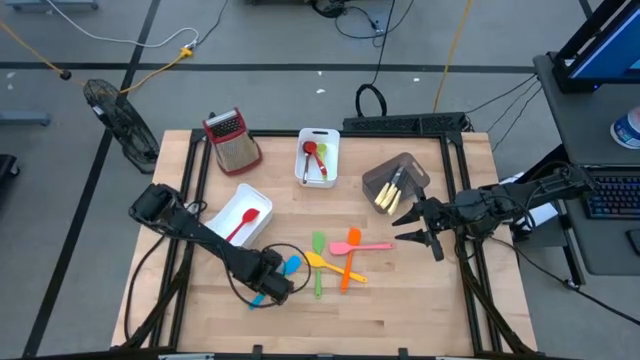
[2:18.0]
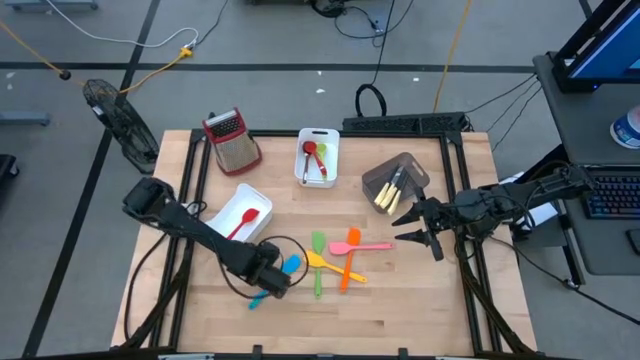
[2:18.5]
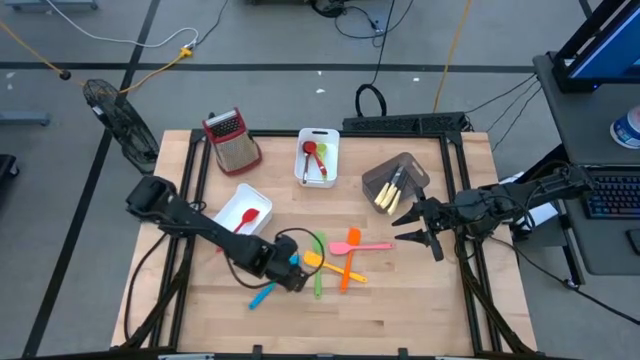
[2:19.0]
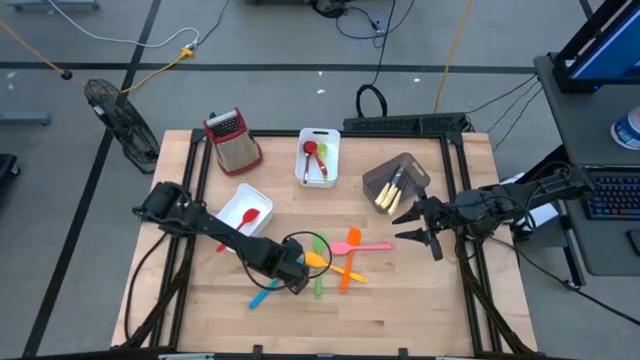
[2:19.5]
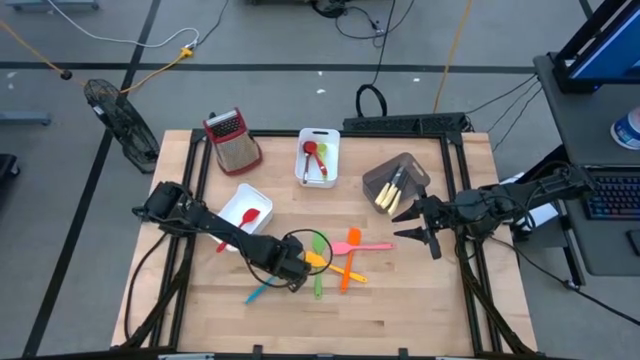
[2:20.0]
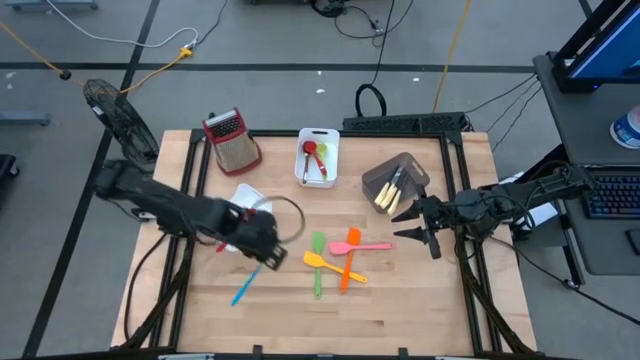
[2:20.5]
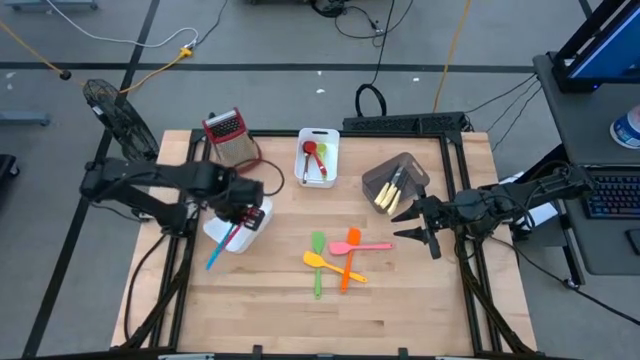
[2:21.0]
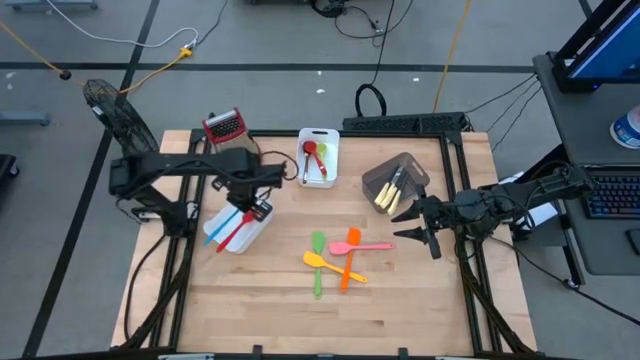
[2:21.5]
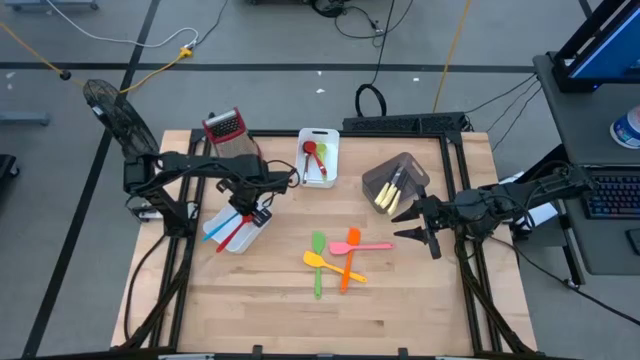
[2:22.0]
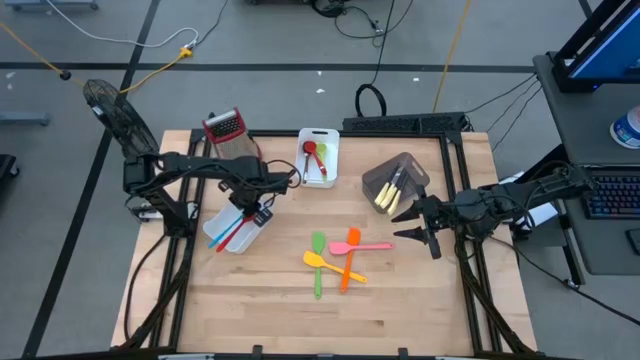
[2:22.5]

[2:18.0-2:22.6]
Task: Pick & Place Kitchen Items
Put the blue spatula into the bottom white bin

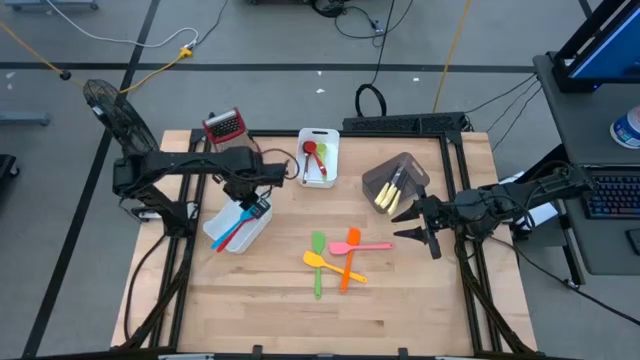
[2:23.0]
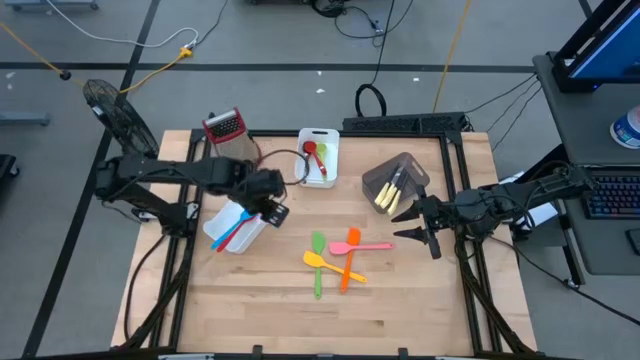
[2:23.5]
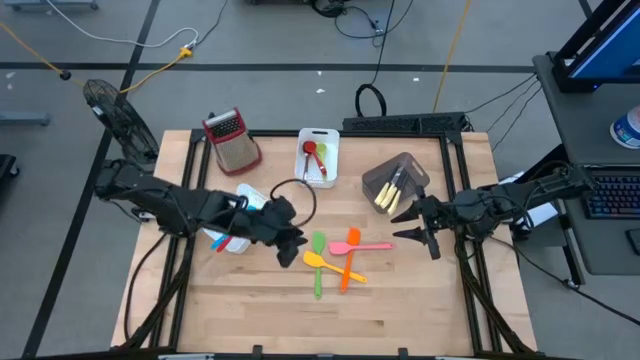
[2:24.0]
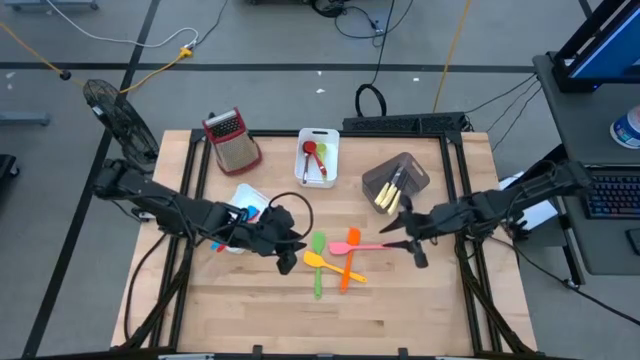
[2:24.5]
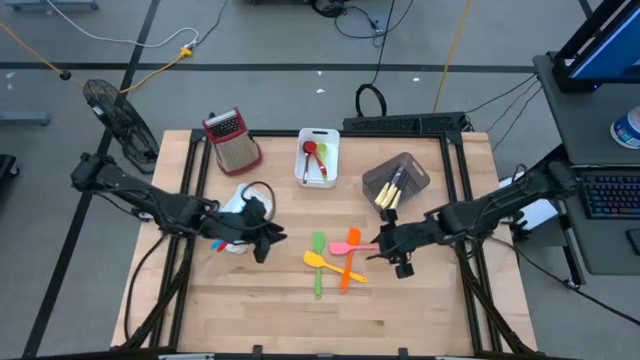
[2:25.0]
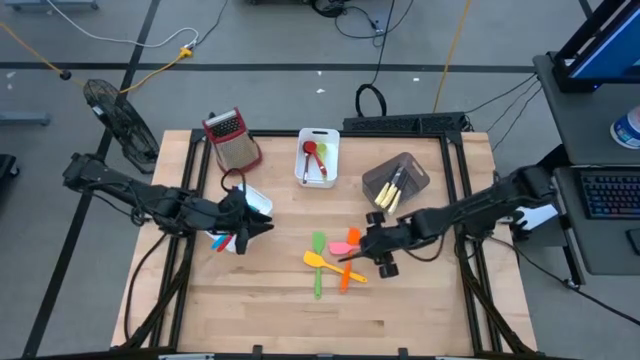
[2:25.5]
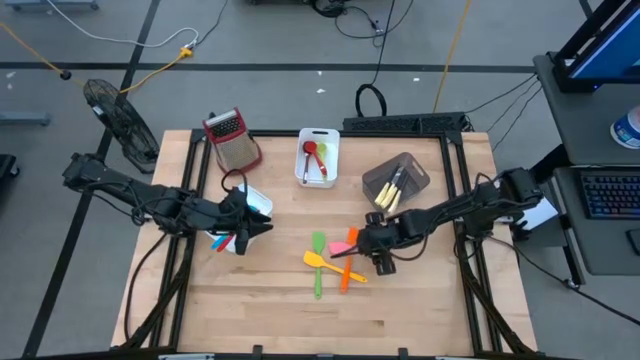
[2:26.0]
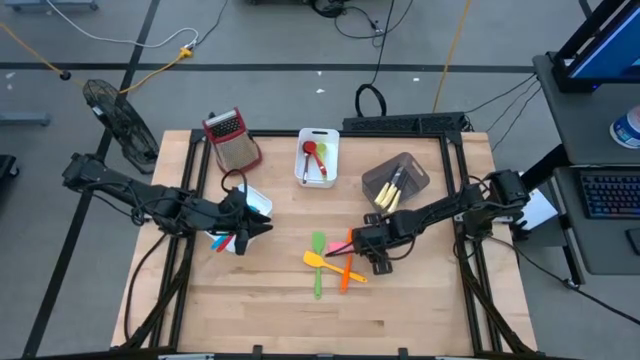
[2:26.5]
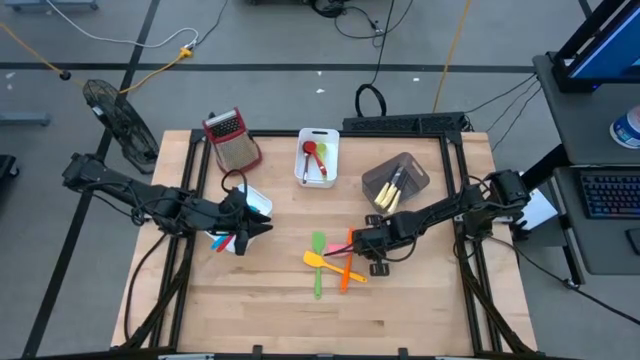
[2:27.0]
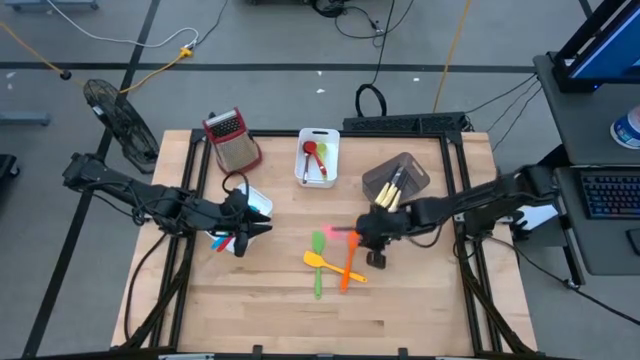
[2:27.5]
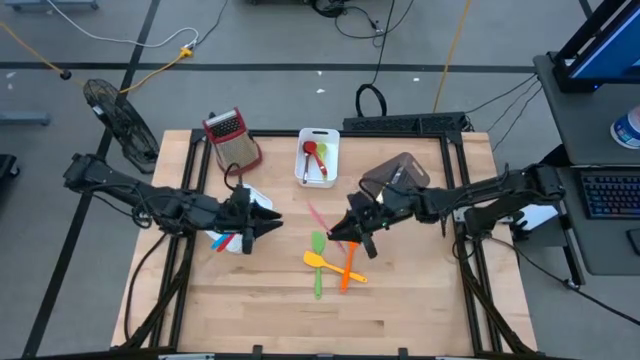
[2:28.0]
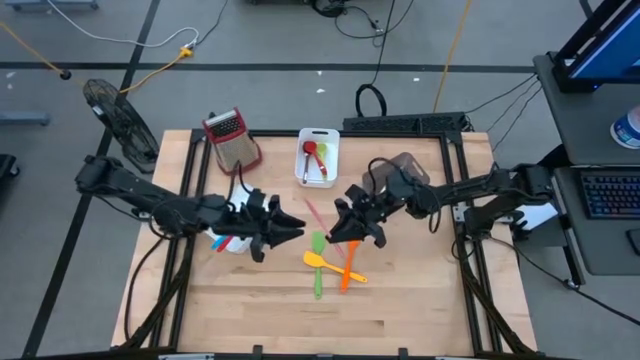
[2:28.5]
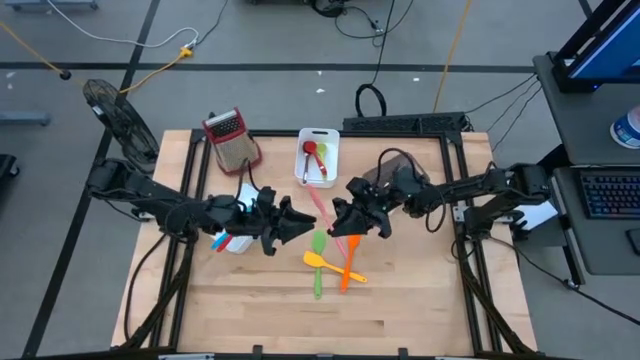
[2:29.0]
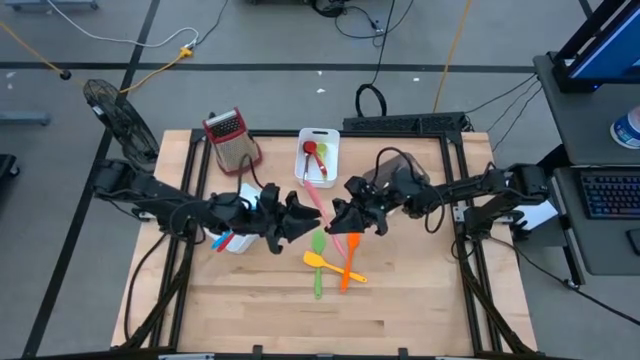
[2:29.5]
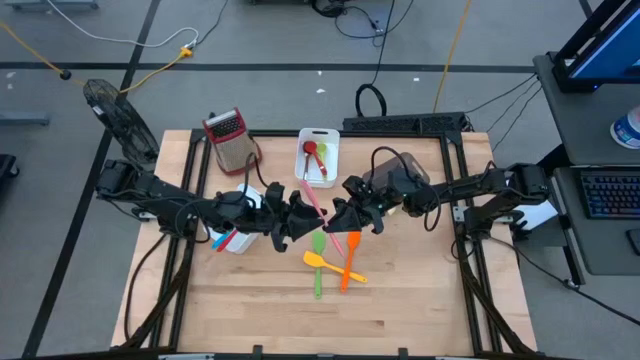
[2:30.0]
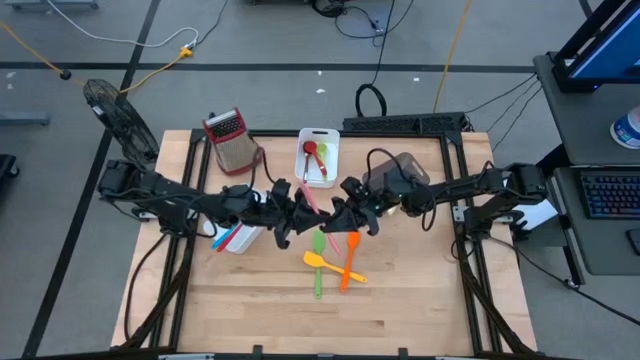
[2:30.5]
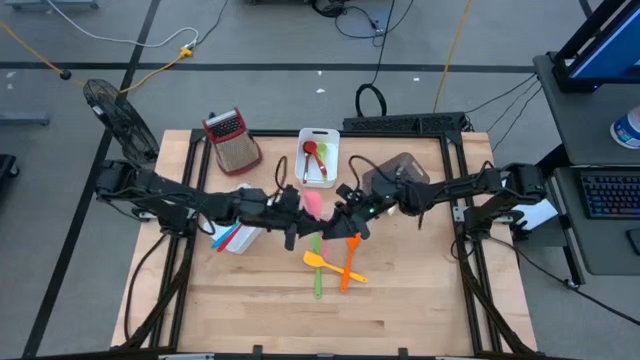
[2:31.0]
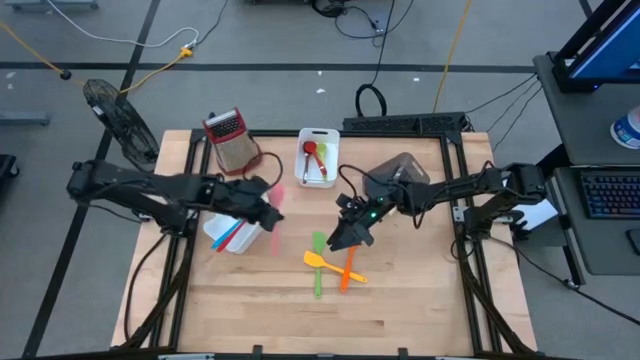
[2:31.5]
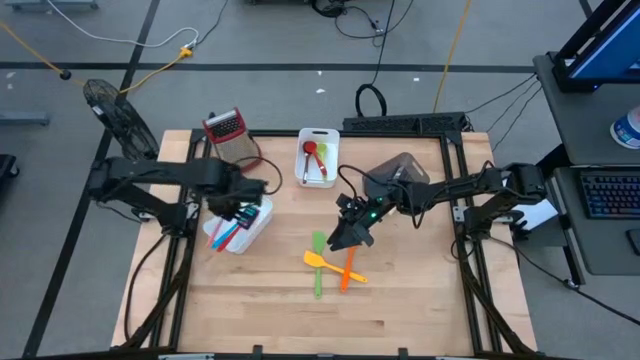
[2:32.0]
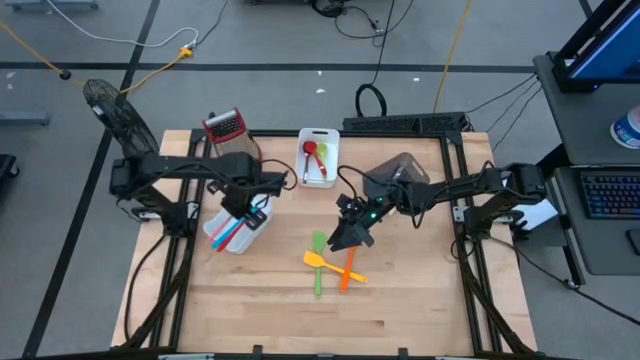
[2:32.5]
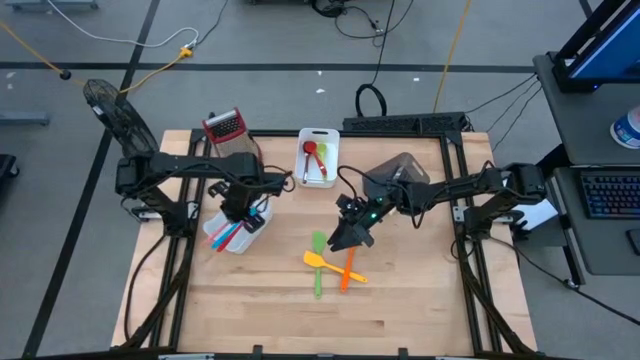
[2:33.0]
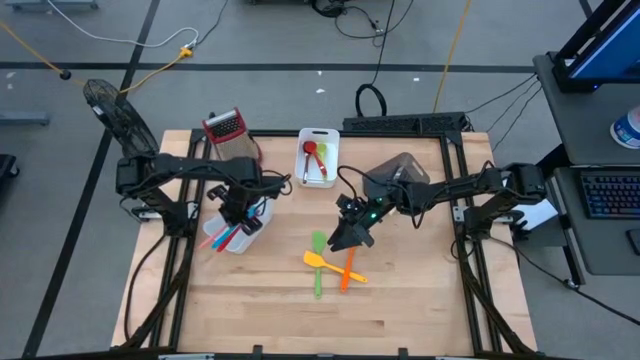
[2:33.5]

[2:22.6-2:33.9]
Put the pink spatula into the bottom white bin

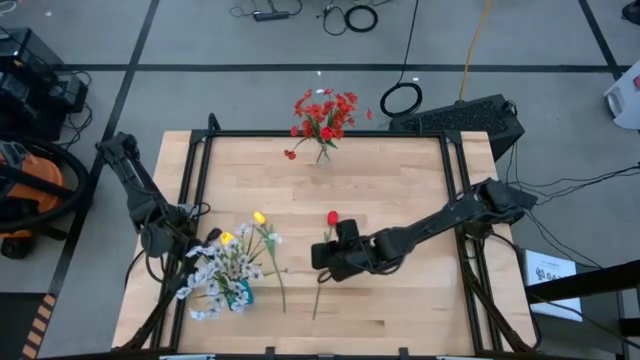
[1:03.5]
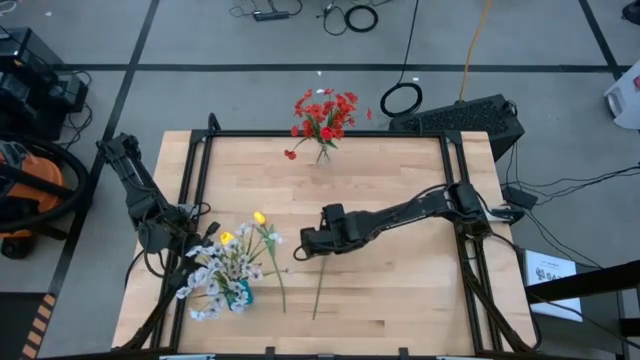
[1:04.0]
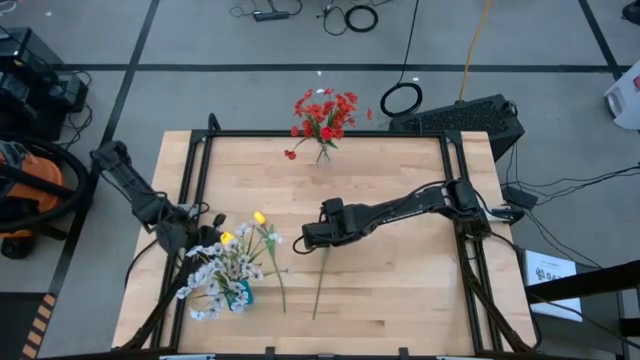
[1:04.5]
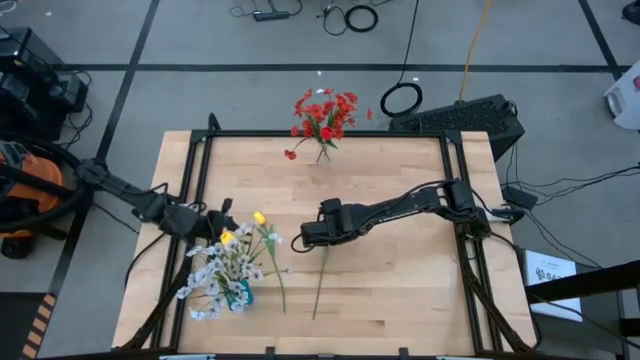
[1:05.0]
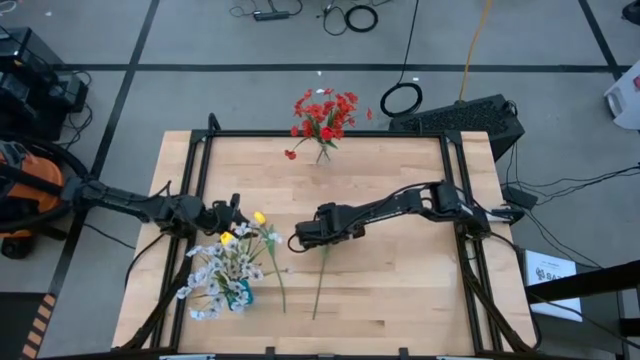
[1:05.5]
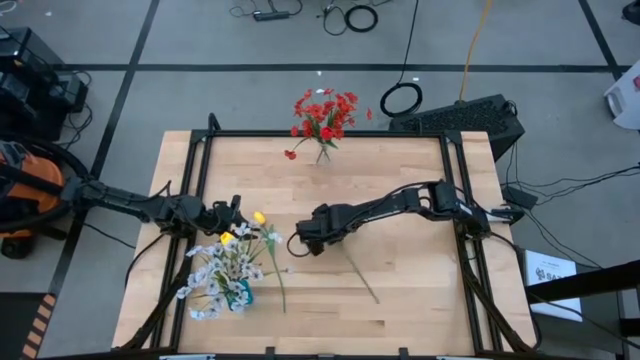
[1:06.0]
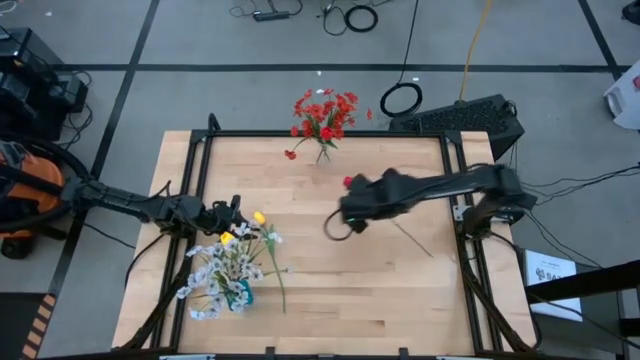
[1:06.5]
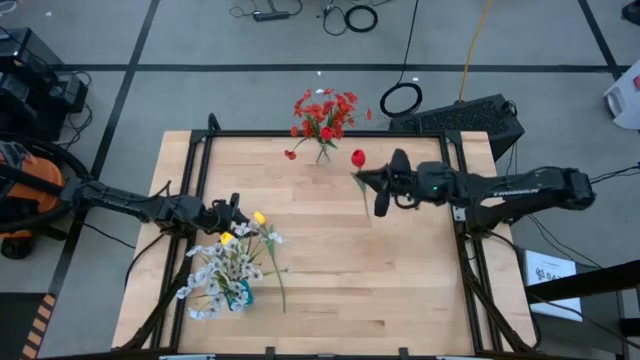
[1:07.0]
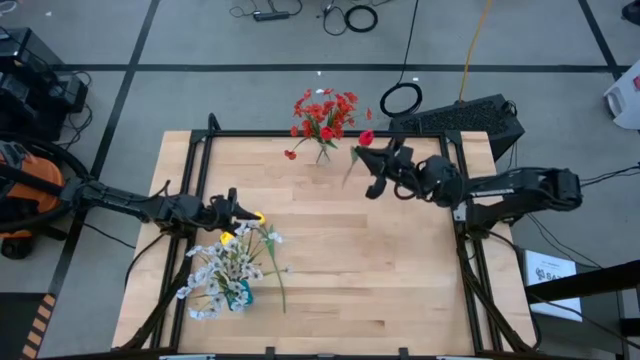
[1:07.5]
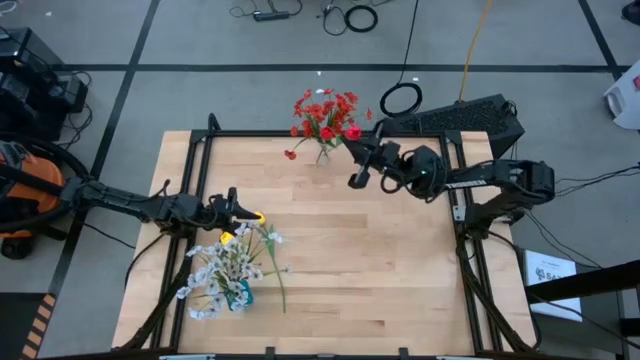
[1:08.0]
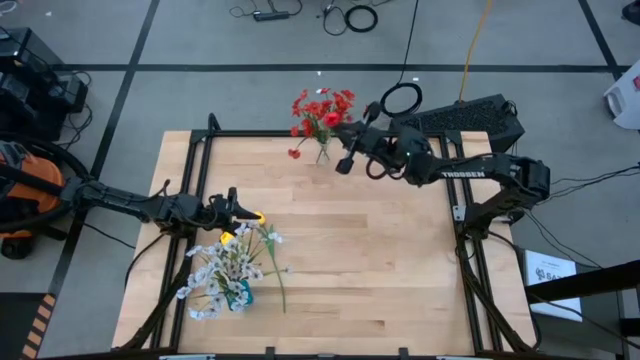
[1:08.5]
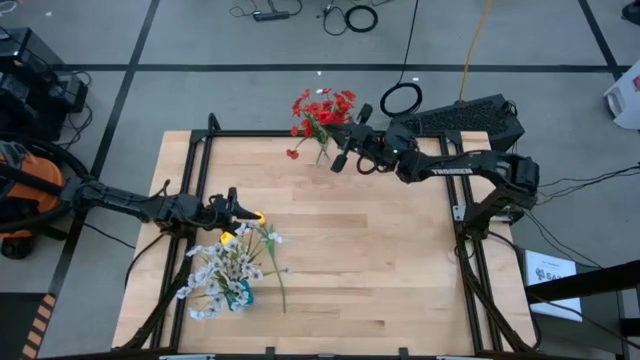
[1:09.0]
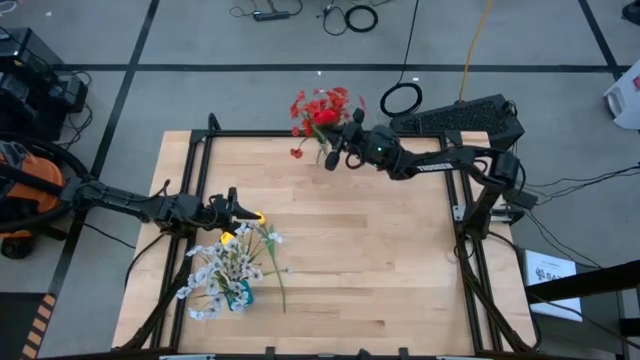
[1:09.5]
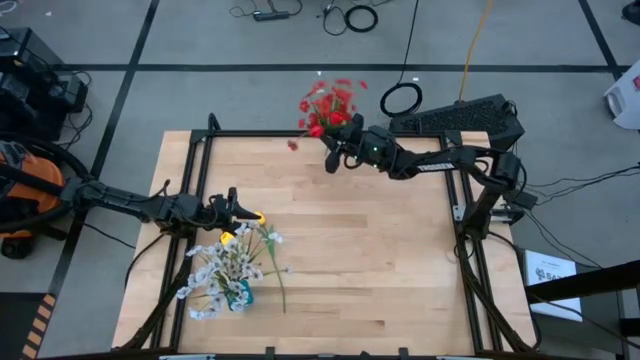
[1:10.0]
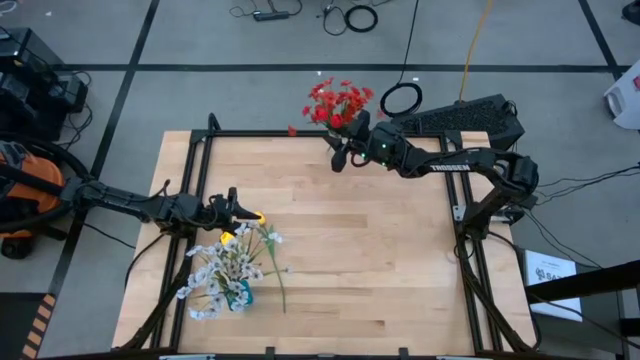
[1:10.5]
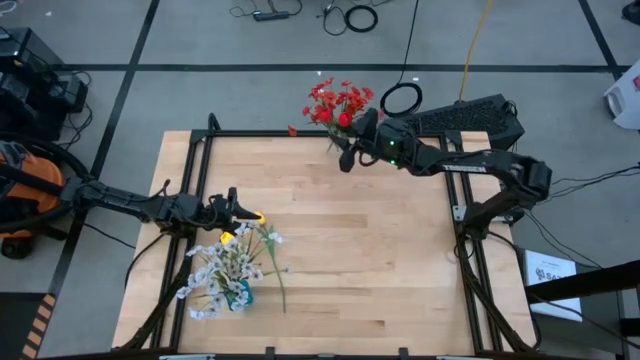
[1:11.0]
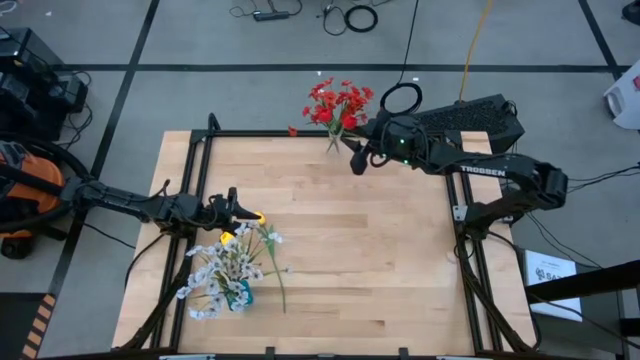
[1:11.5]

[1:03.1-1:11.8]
Task: Sort flowers into vase by color
Put the red flower into the transparent vase
